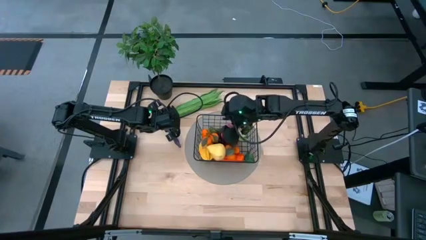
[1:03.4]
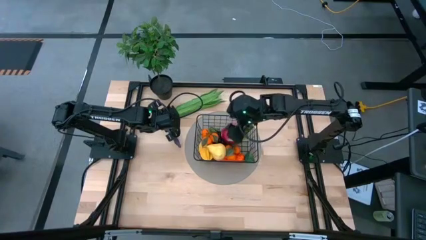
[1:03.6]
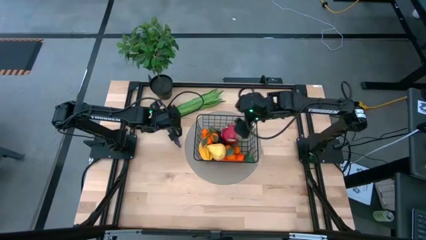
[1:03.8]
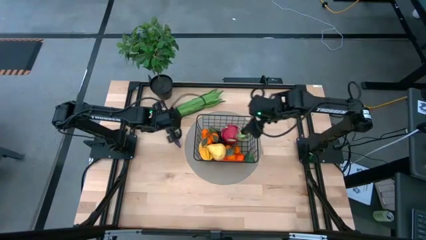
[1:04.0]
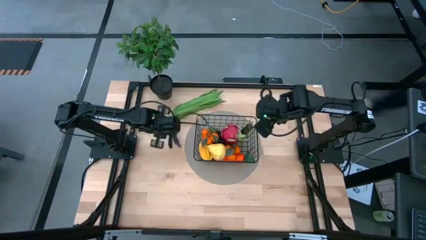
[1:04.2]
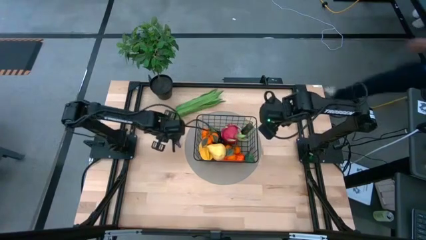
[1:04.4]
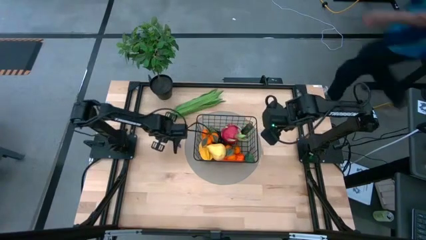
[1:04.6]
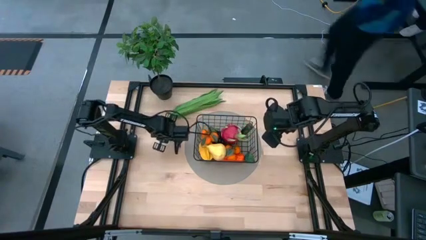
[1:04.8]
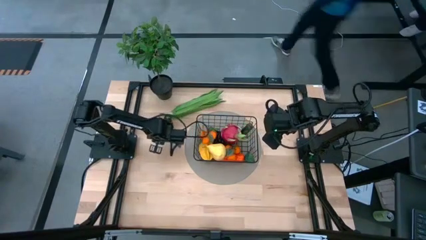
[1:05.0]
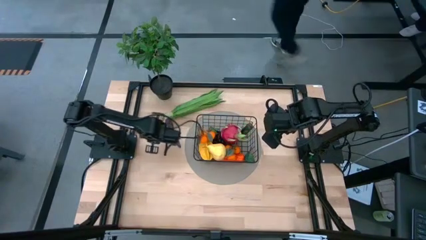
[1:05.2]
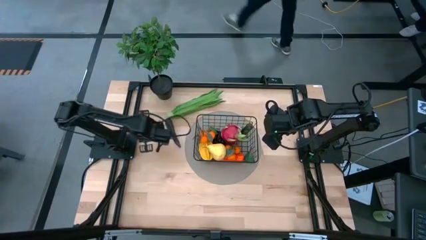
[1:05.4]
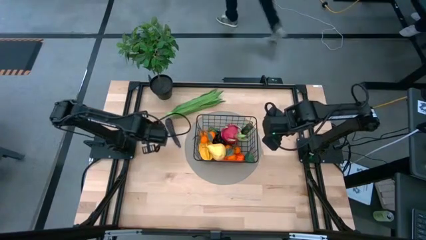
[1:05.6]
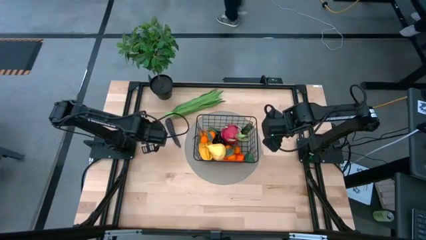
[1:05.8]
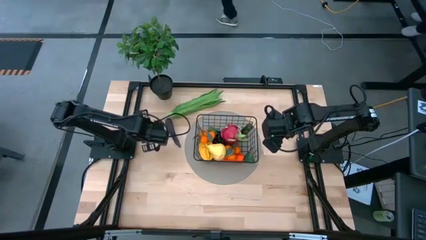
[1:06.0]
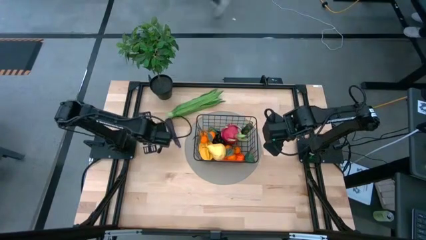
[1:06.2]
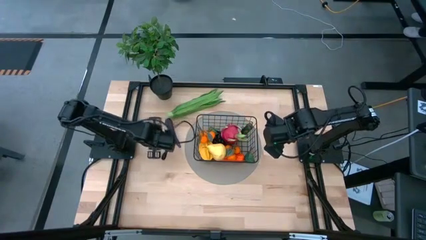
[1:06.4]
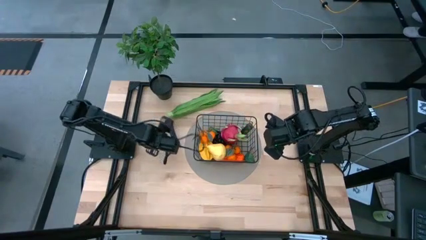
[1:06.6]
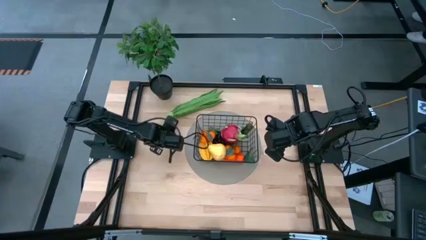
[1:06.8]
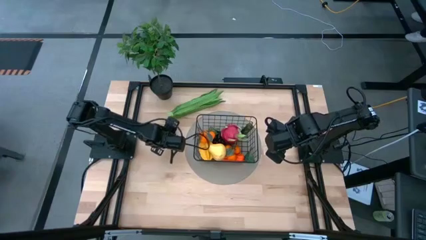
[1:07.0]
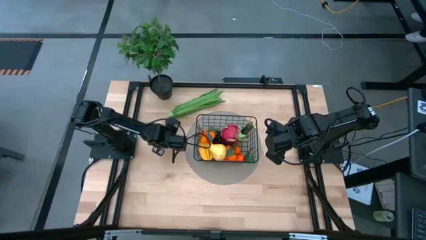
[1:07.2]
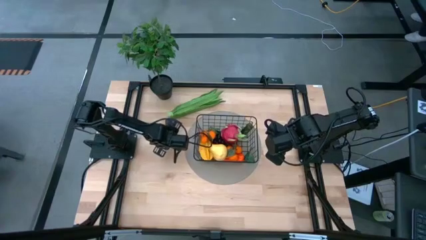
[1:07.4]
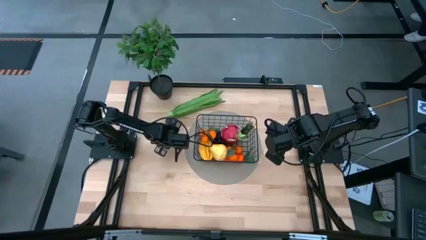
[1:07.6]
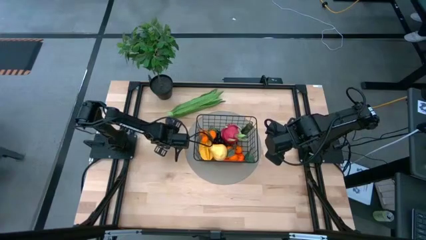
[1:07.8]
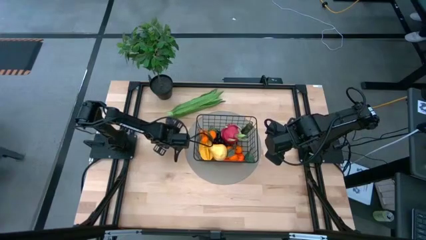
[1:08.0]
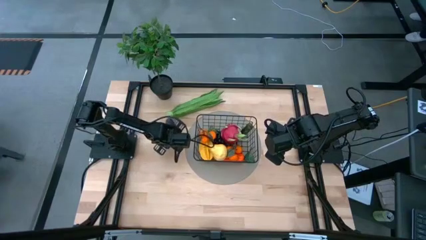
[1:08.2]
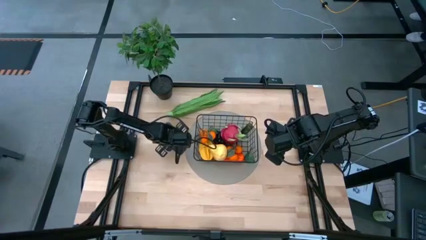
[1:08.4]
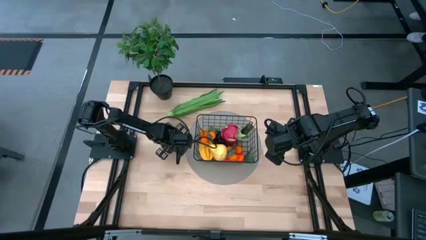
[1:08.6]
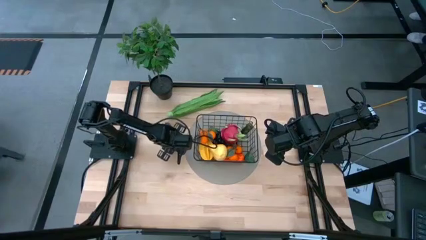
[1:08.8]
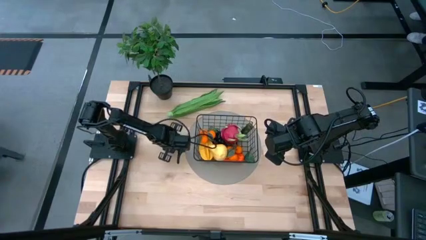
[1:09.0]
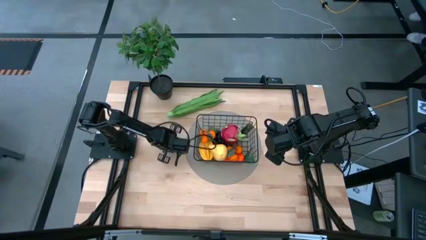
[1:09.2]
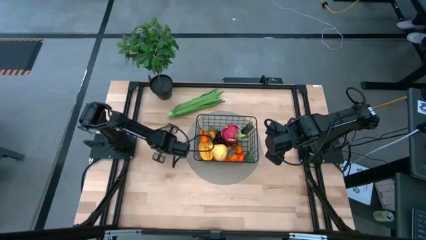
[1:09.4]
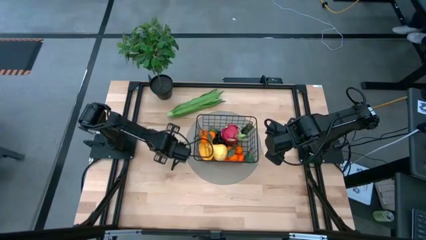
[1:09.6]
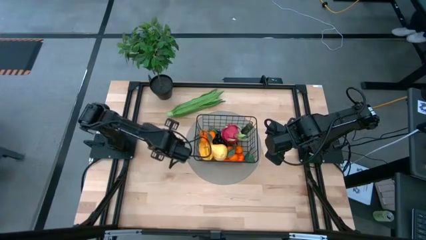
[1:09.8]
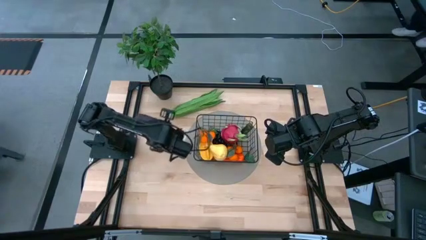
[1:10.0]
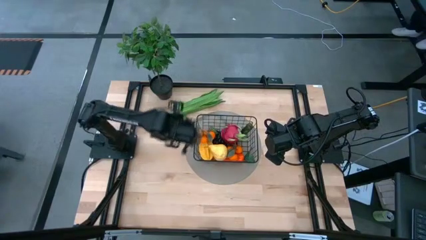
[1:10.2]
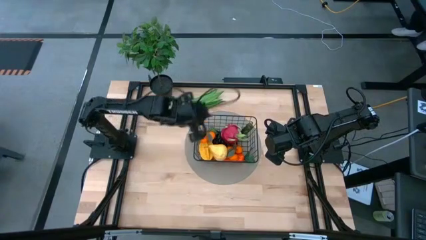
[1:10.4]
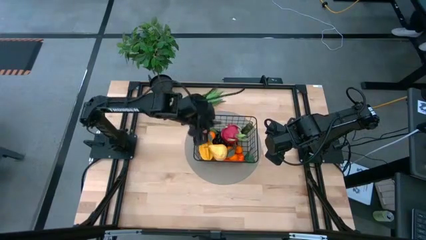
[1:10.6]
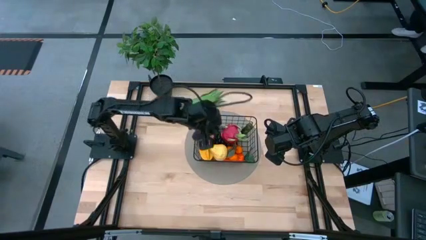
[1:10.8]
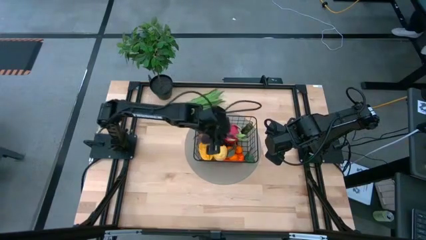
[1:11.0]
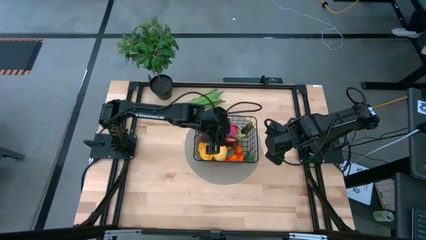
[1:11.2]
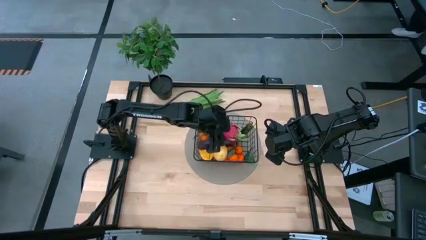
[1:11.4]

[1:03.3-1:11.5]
Task: Build produce basket
Put the violet eggplant into the black wire basket

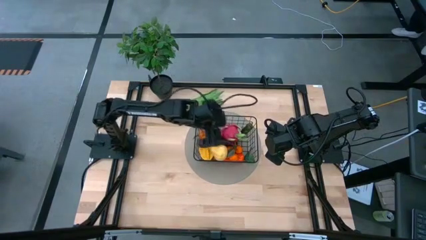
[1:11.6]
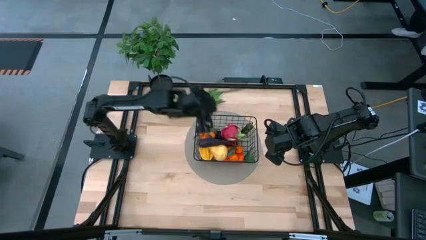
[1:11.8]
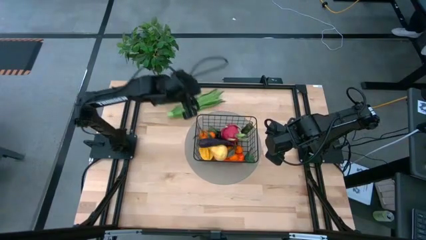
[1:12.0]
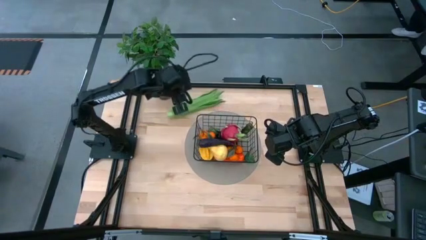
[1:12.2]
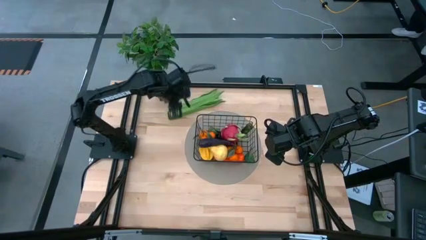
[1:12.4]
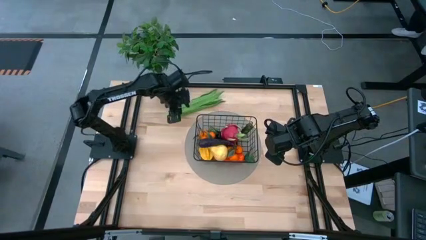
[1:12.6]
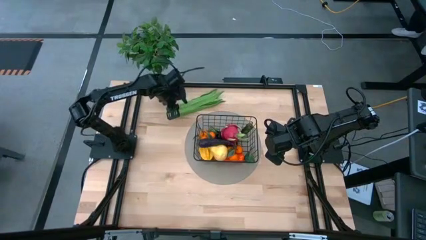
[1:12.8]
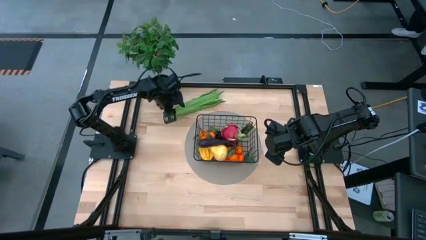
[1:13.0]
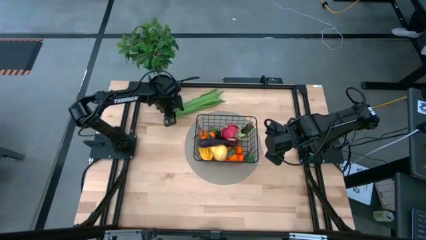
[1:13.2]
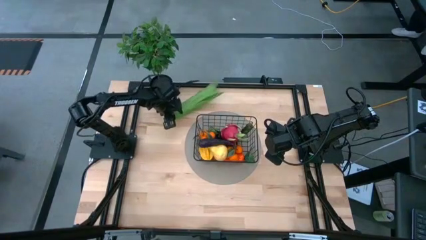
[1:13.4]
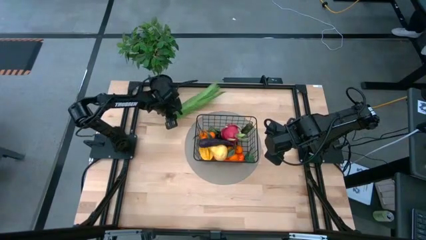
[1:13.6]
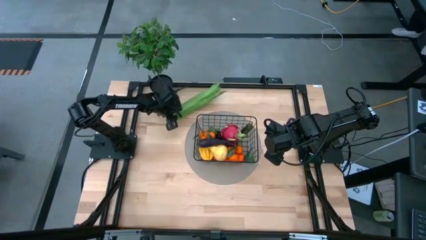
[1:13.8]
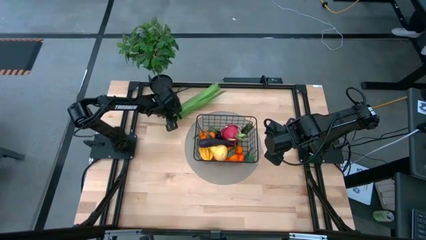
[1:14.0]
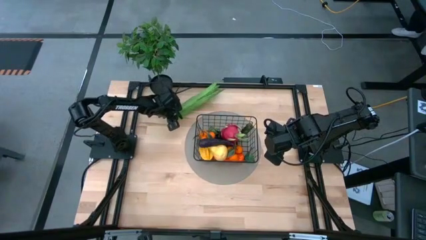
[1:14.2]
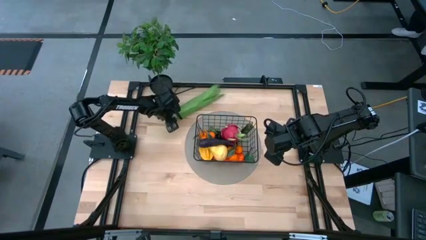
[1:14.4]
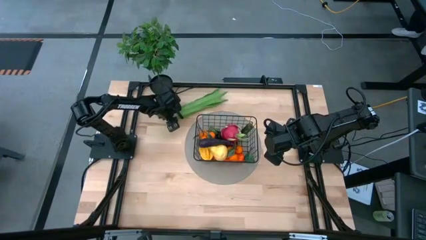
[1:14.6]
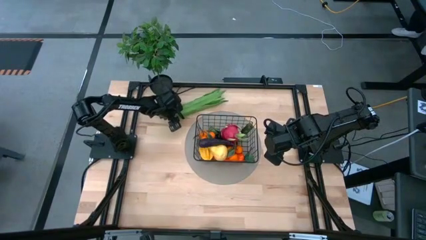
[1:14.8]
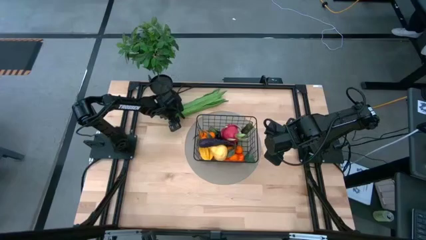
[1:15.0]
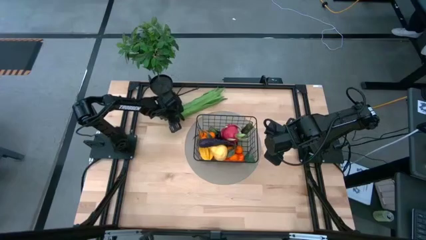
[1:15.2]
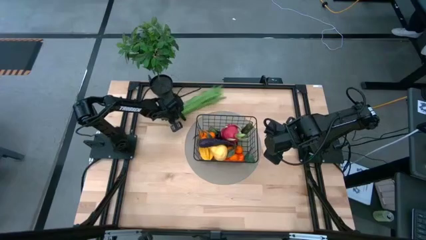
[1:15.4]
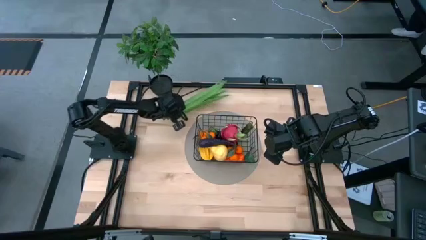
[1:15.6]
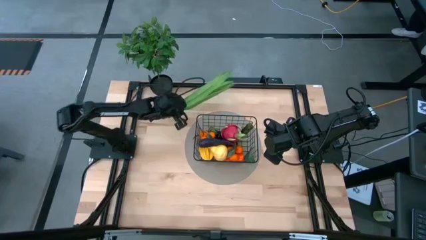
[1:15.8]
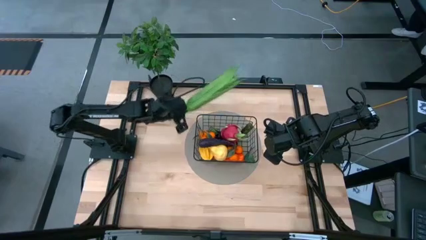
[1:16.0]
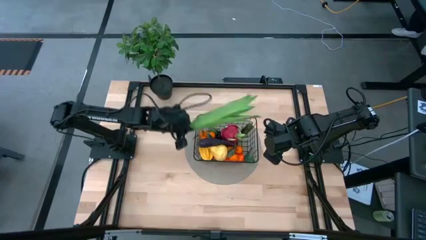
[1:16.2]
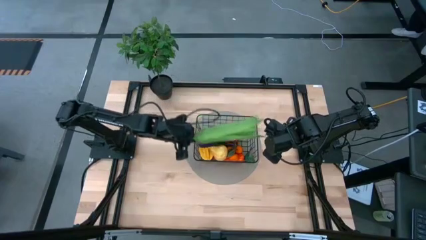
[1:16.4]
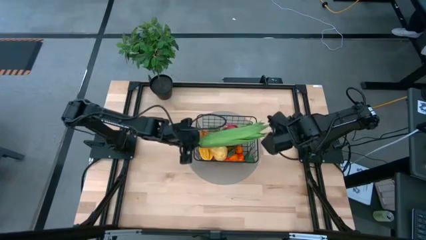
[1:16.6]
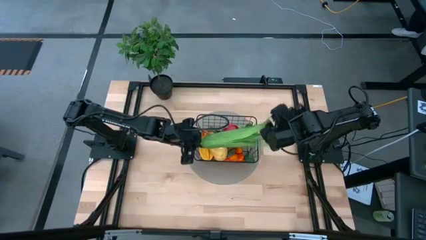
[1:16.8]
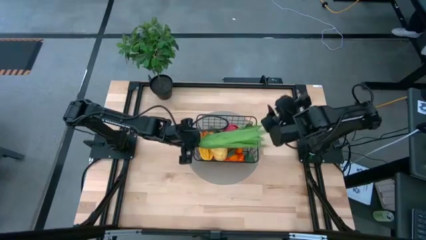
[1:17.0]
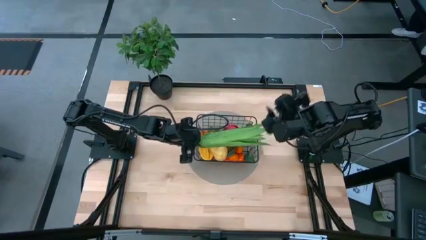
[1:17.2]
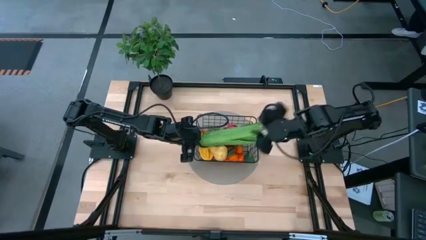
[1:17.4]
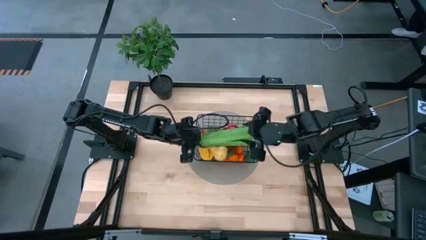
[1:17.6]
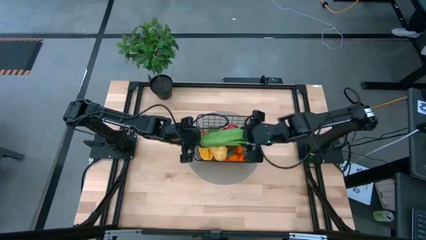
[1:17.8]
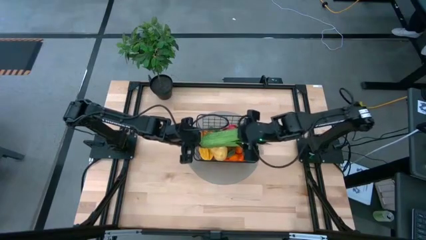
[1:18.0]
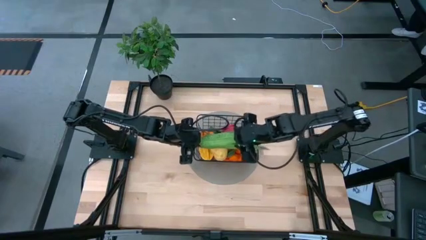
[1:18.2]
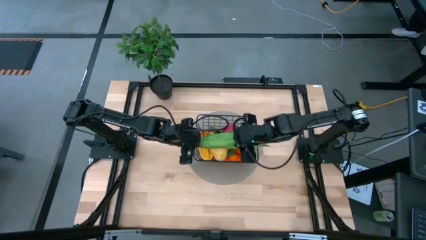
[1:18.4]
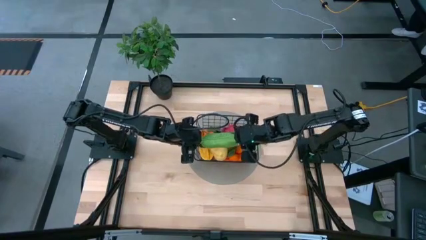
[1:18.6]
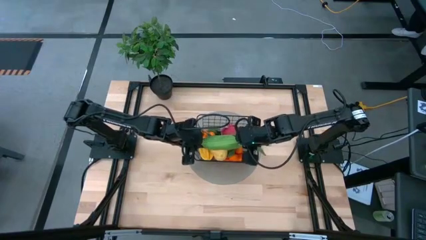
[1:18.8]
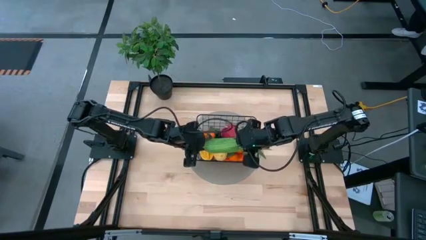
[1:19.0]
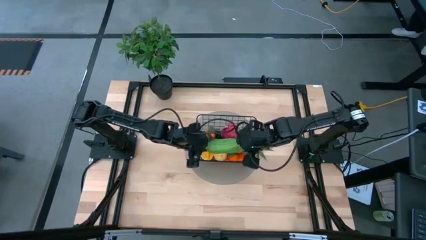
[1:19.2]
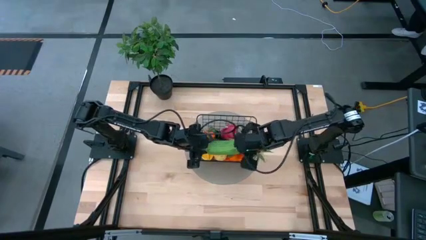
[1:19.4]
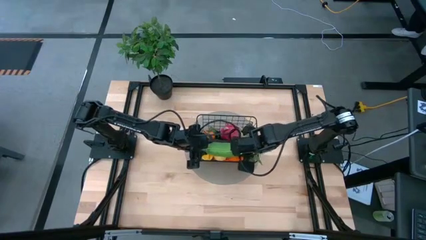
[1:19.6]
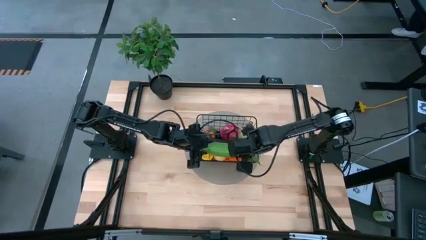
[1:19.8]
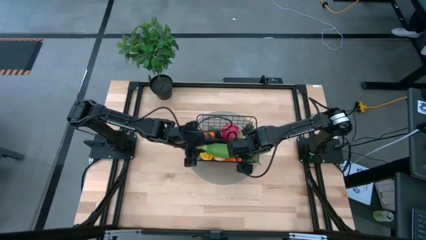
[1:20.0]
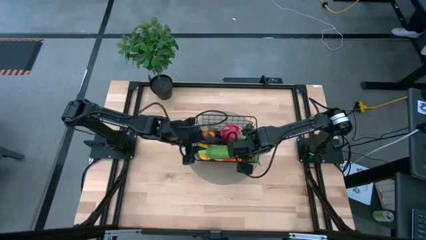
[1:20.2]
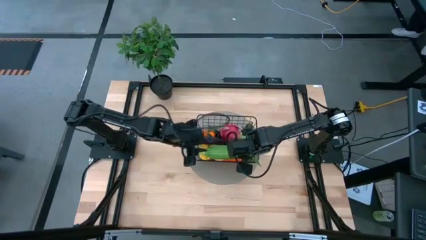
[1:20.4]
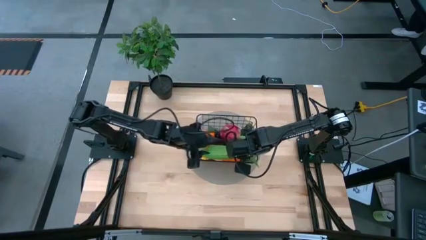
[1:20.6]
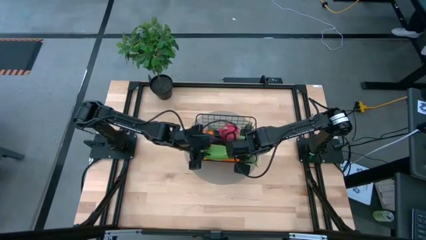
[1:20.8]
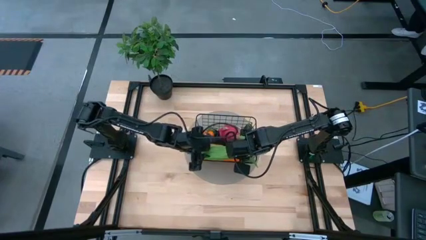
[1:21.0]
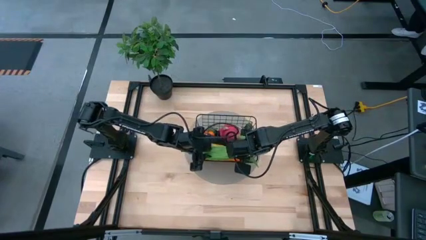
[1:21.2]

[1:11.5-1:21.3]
Put the green leaf lettuce into the black wire basket
